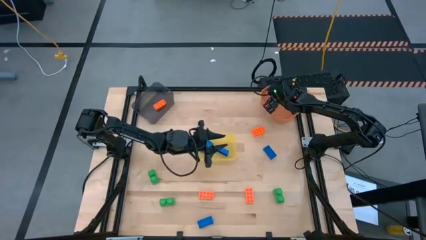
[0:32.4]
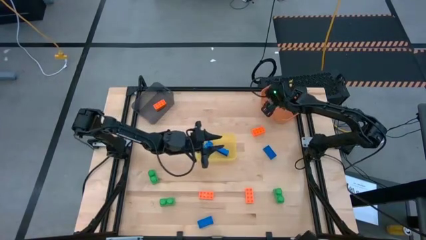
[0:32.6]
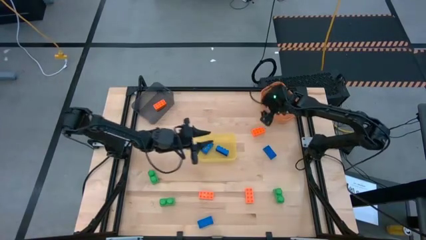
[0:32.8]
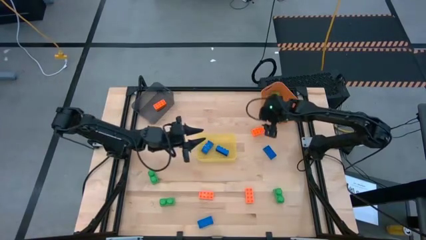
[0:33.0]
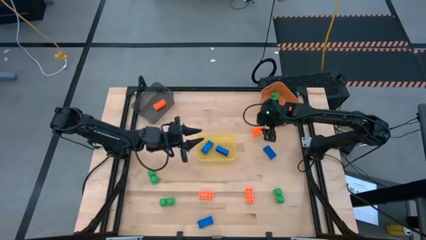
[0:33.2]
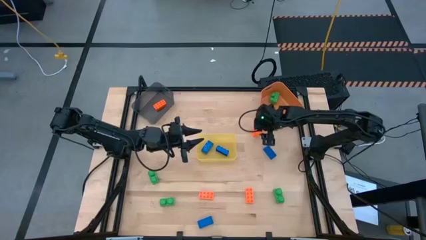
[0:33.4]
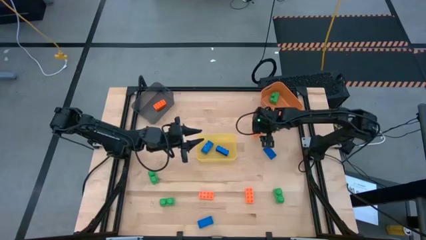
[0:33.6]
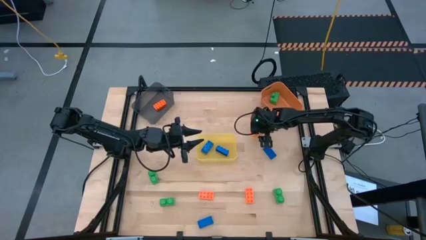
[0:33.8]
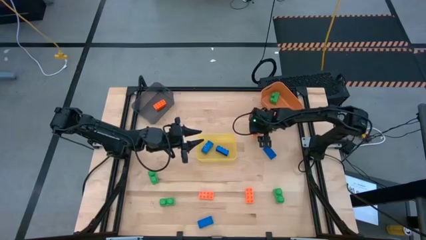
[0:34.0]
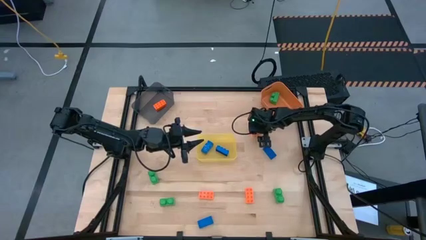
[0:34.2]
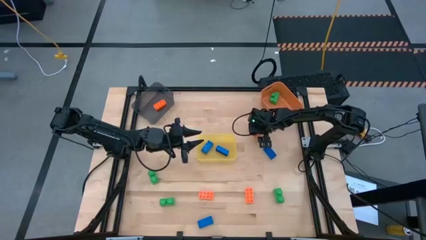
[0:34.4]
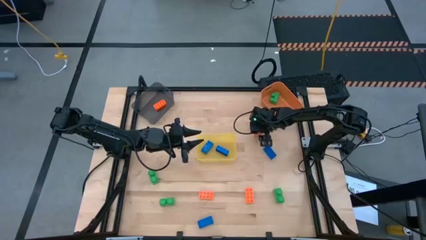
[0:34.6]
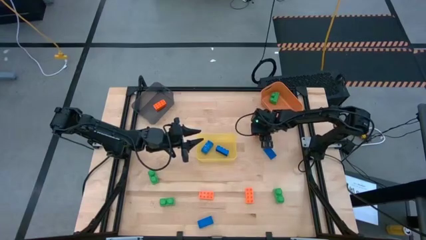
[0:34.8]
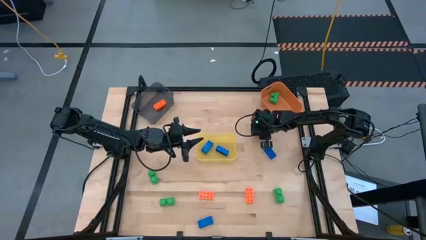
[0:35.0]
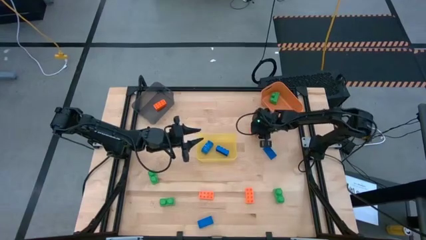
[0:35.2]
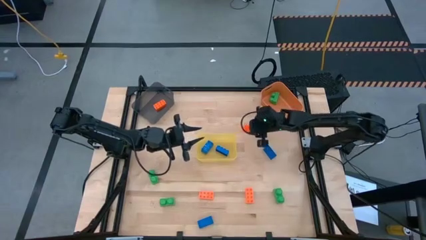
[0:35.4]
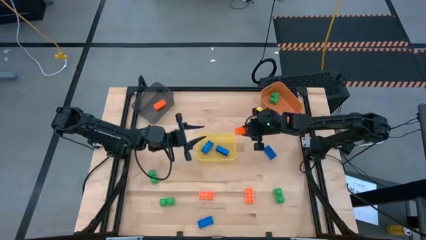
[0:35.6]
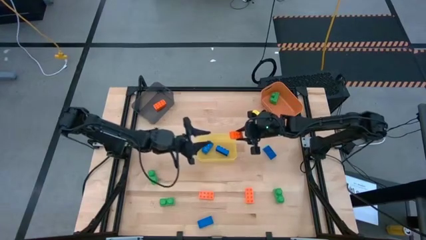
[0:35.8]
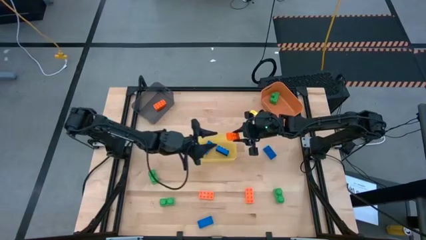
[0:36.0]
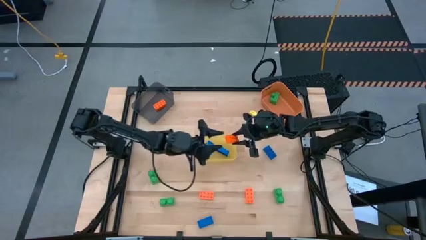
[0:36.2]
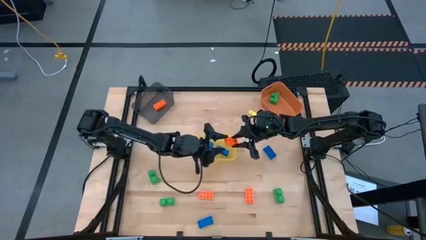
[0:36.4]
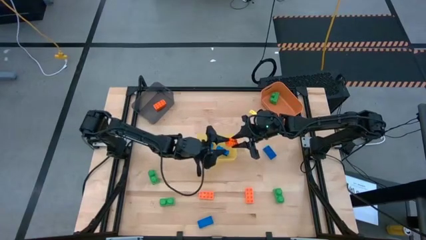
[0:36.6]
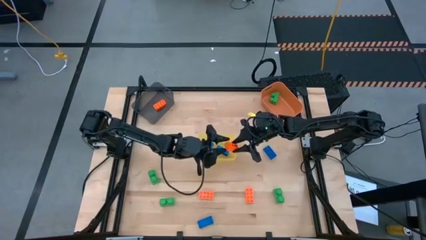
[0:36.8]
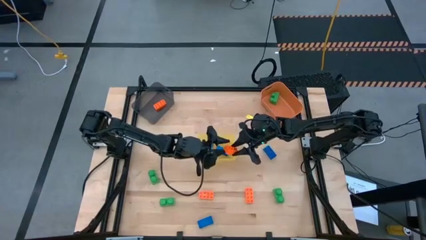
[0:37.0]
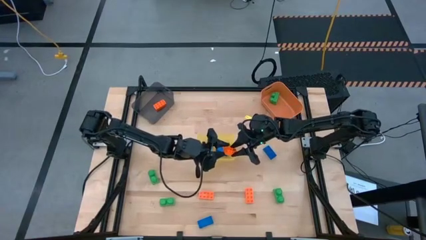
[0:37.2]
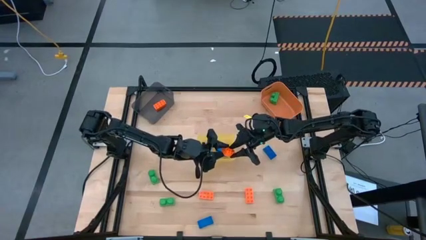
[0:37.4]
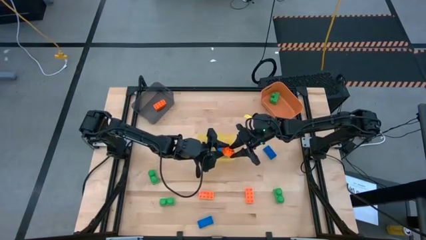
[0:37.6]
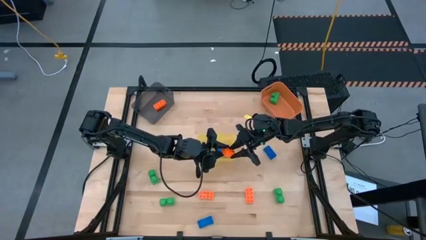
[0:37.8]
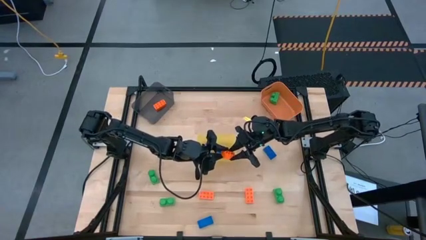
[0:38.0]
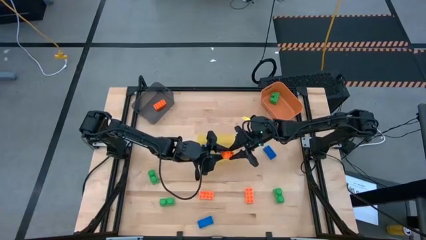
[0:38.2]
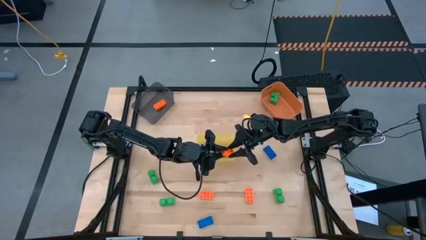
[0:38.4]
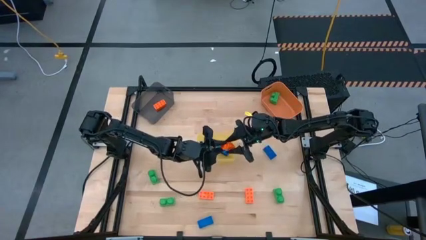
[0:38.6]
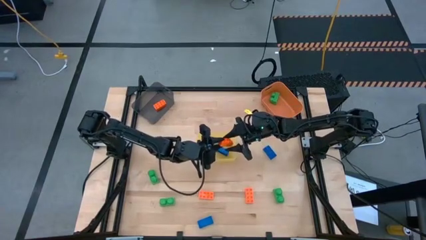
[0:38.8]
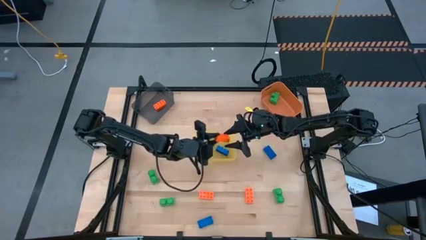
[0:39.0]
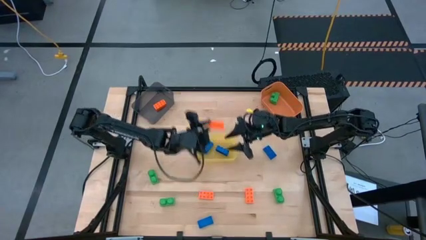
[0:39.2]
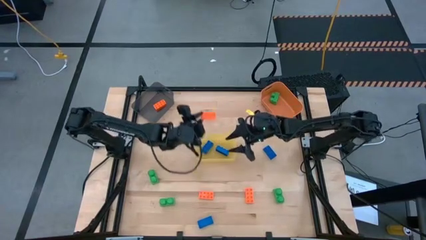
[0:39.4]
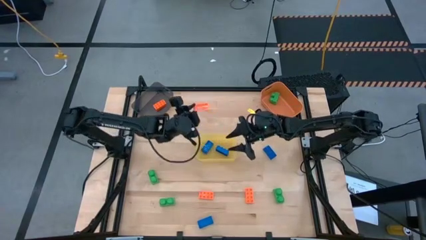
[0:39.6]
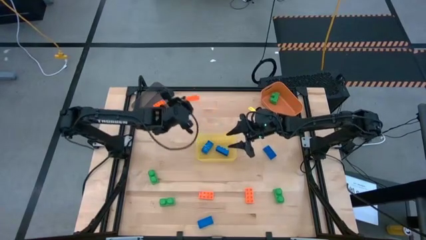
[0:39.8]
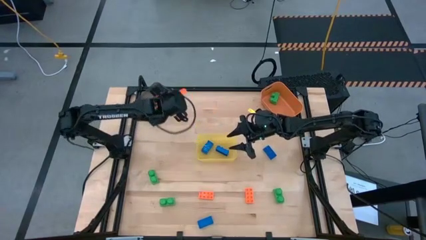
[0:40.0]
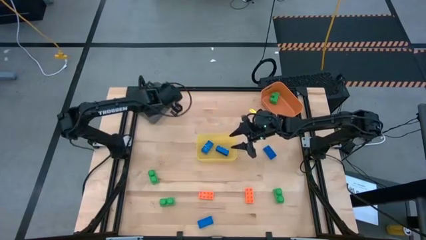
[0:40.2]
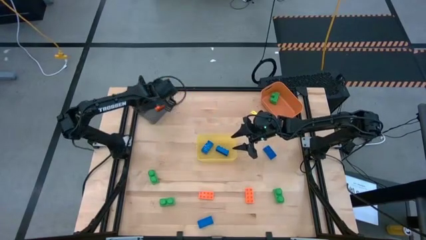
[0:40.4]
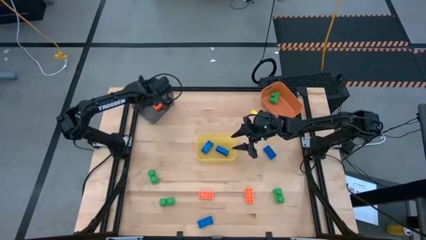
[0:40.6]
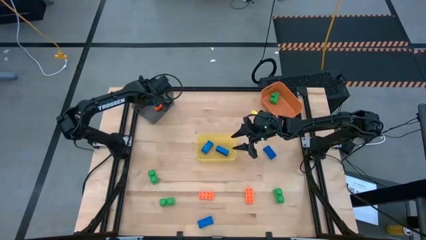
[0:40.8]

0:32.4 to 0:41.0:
Task: Sort & place blocks by color
Put the orange game piece into the black bin

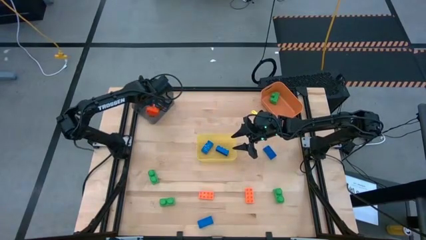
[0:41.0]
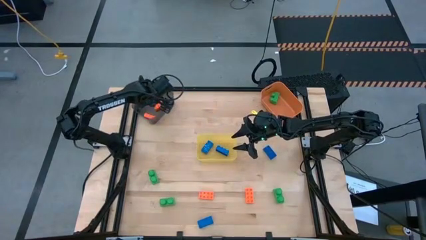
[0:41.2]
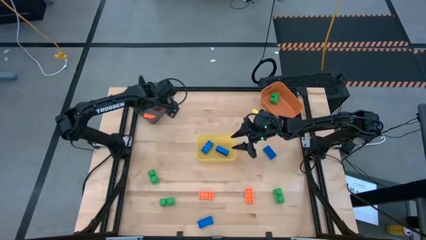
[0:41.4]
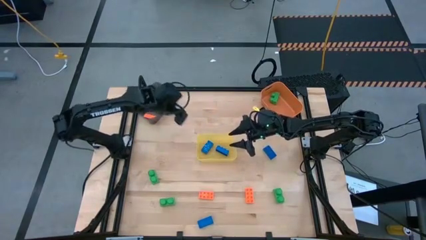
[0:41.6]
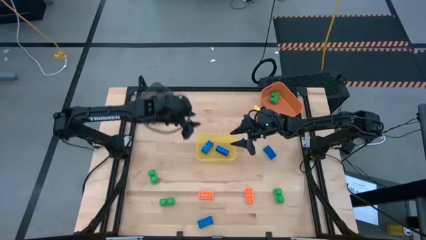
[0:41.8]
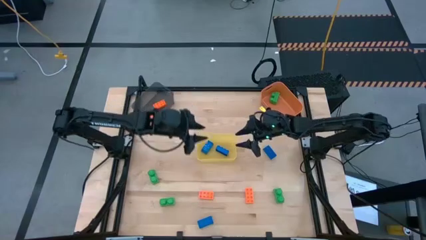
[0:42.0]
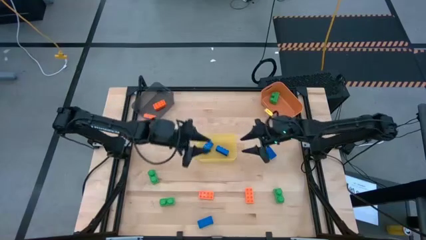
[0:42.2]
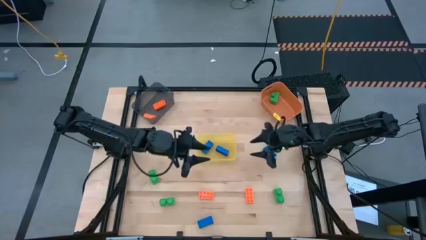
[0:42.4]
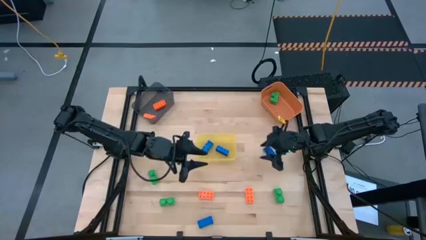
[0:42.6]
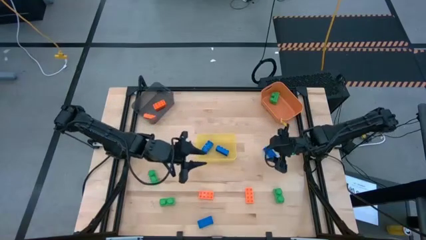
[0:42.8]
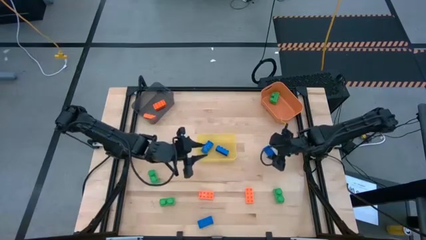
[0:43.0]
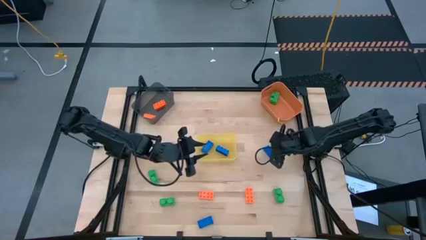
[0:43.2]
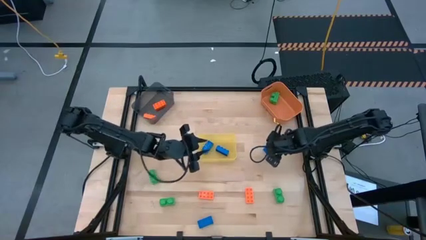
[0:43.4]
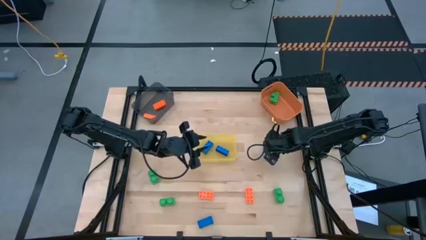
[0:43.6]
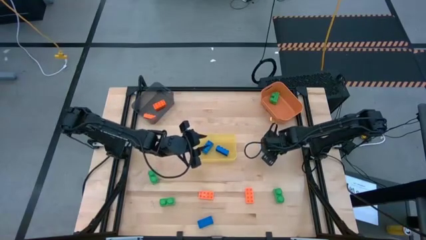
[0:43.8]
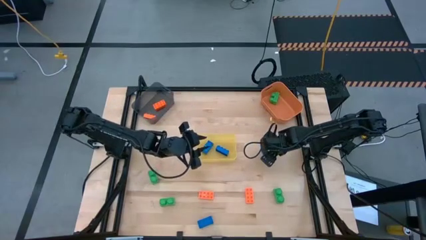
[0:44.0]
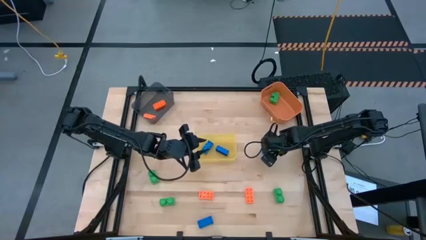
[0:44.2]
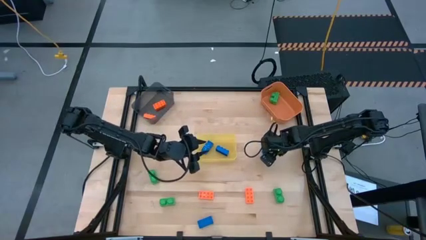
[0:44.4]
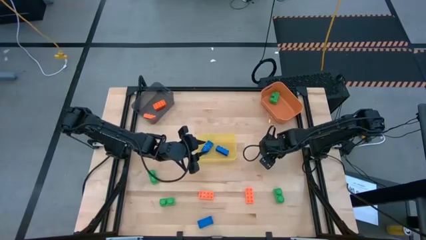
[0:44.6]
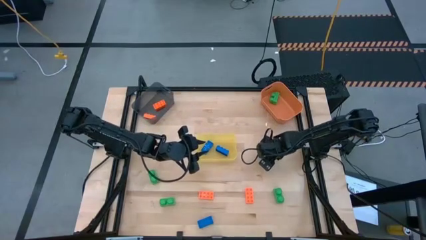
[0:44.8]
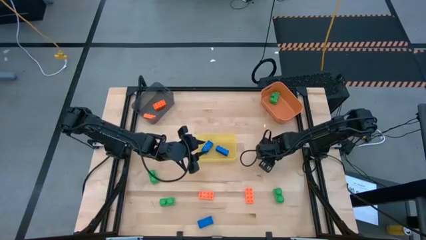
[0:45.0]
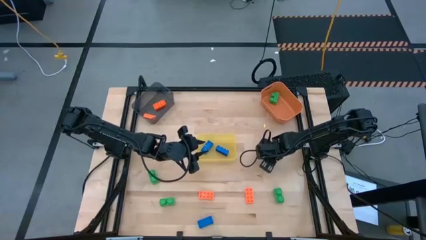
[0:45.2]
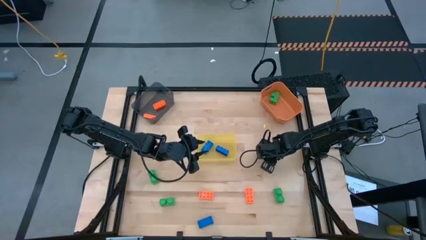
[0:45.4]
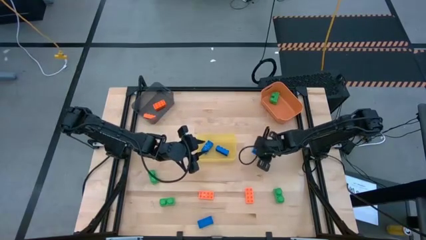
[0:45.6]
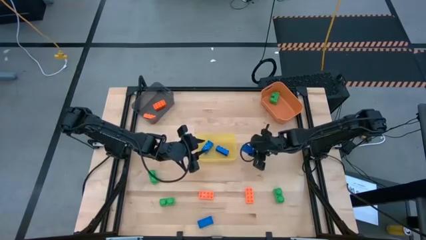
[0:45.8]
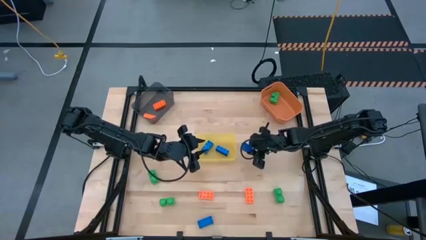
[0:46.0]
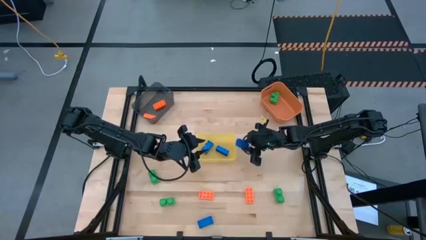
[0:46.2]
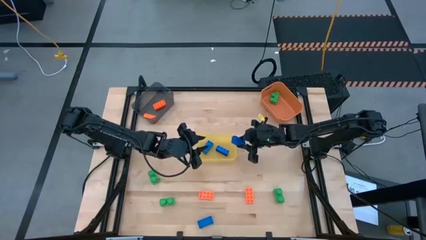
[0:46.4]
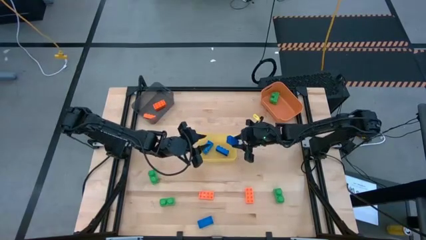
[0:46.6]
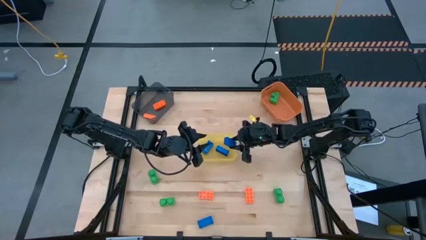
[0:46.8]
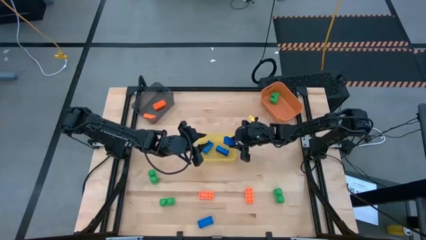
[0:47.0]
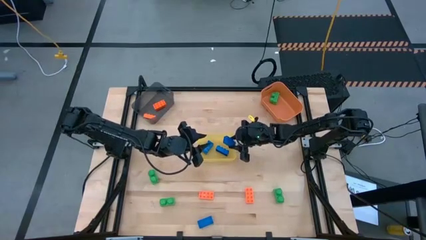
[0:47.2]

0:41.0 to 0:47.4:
Put the blue game piece into the yellow bin

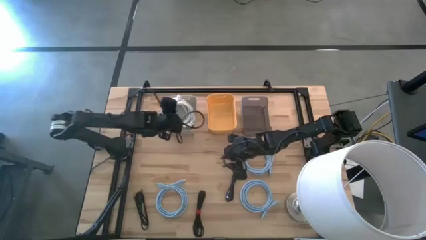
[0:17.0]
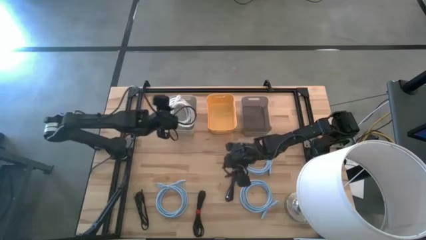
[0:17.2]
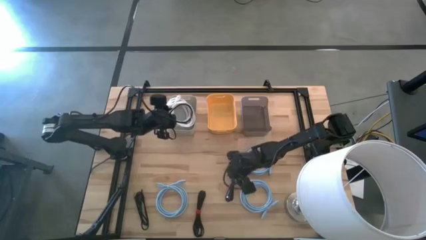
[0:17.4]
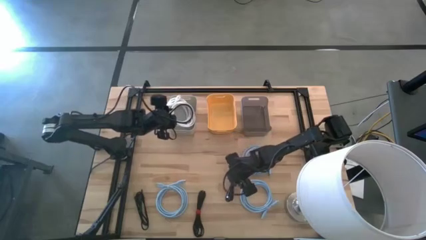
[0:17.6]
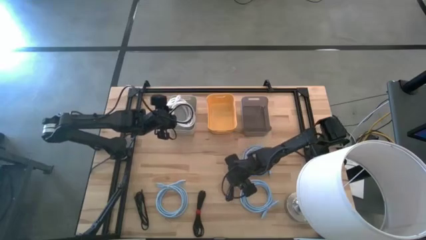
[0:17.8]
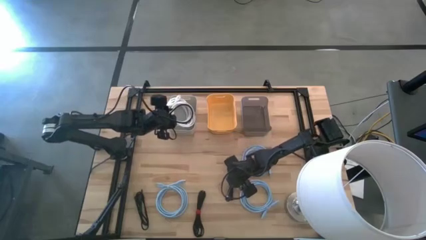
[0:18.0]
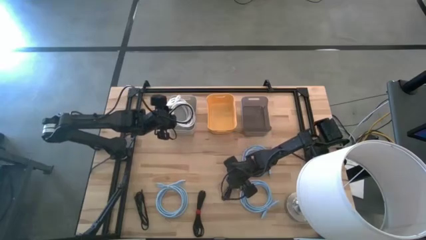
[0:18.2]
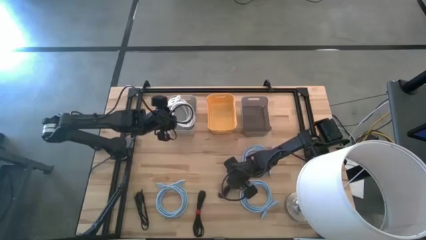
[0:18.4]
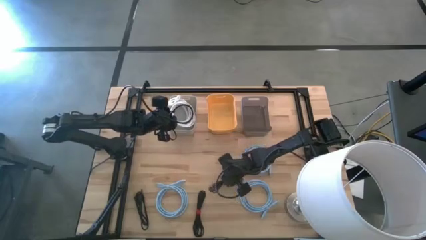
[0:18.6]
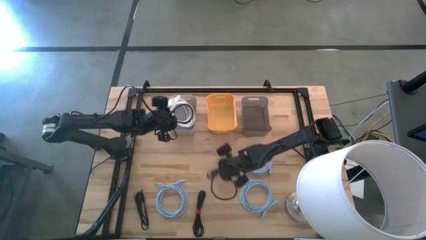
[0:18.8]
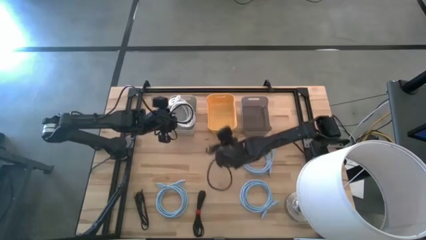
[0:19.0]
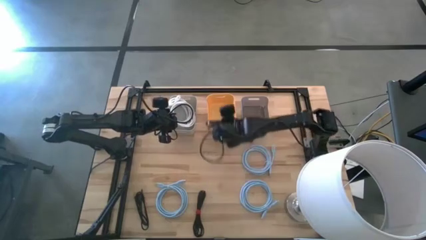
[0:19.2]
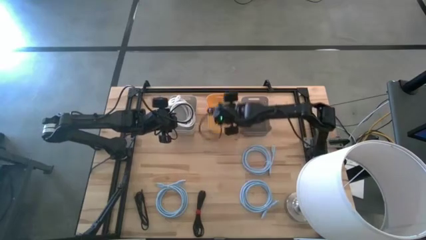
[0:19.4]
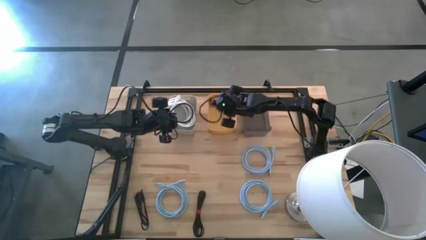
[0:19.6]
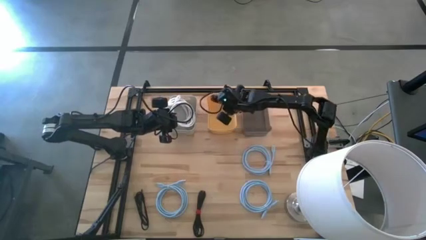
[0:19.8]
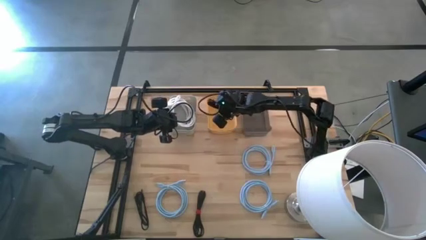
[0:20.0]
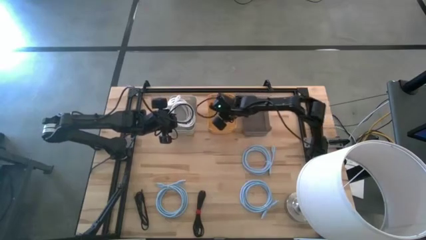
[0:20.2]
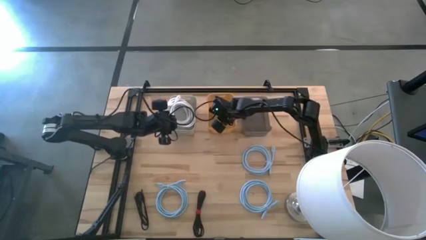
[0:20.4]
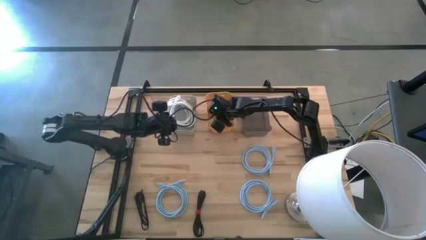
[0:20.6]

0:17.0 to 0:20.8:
Task: Sort HDMI cables
Put the top black HDMI cable into the yellow bin
